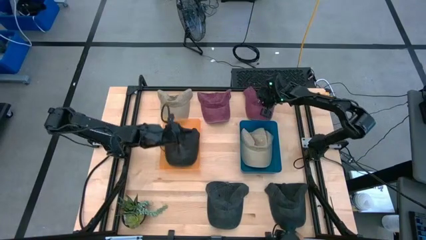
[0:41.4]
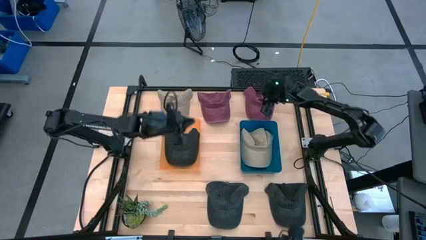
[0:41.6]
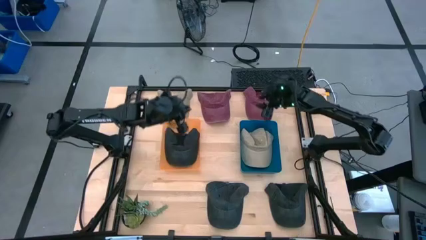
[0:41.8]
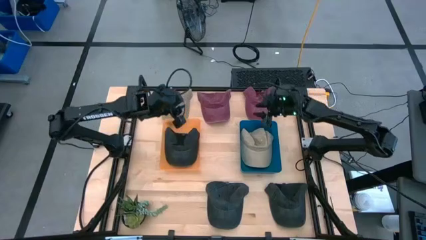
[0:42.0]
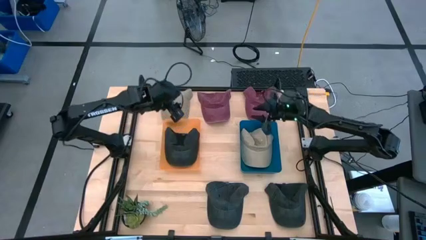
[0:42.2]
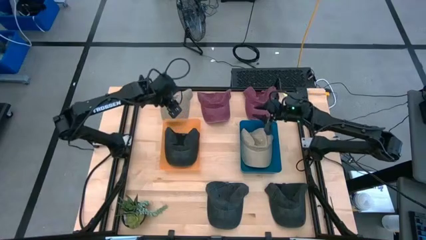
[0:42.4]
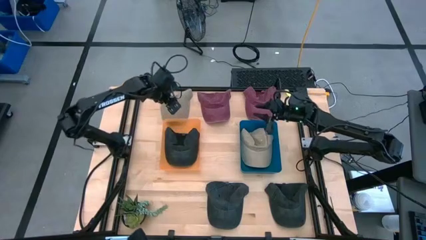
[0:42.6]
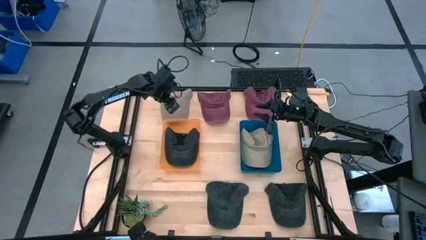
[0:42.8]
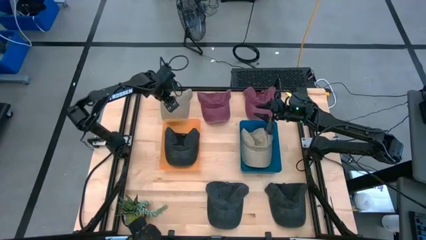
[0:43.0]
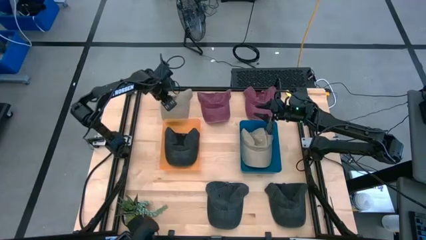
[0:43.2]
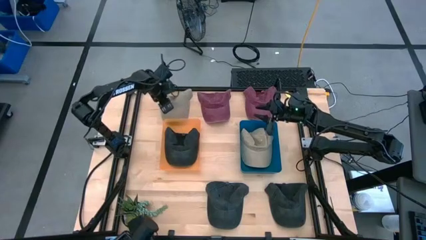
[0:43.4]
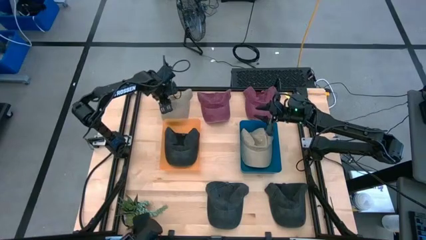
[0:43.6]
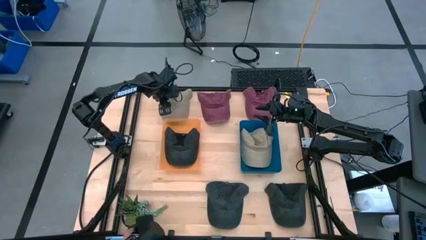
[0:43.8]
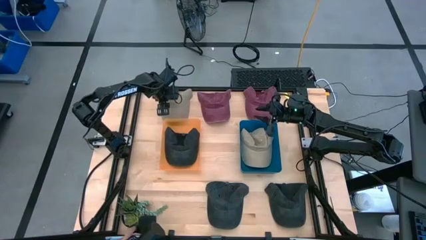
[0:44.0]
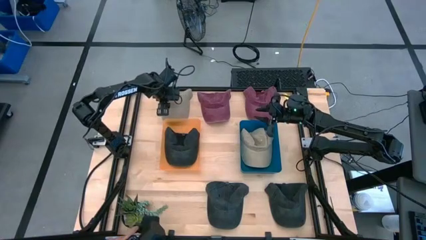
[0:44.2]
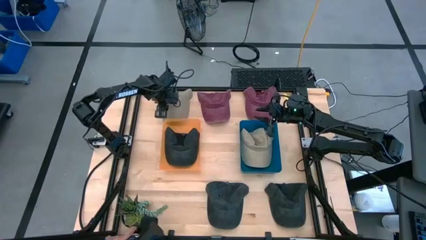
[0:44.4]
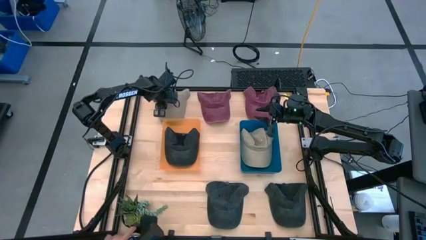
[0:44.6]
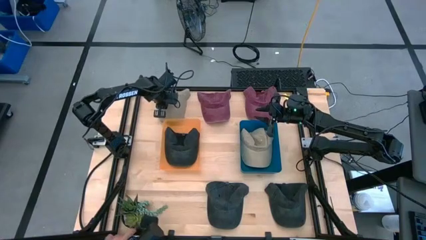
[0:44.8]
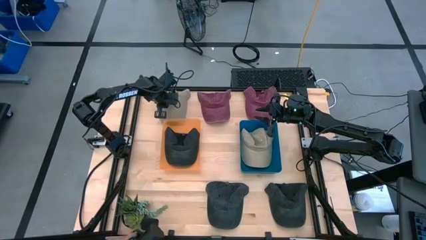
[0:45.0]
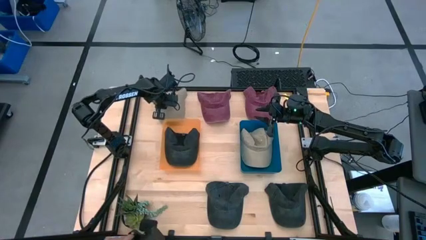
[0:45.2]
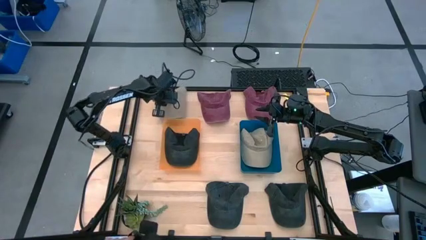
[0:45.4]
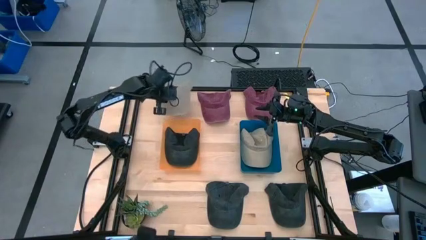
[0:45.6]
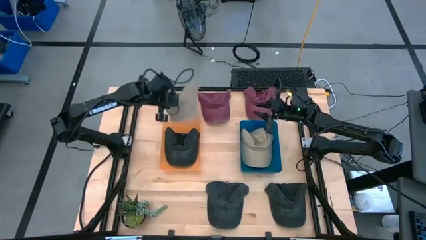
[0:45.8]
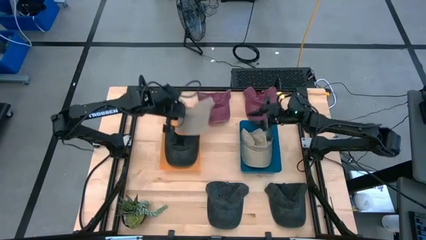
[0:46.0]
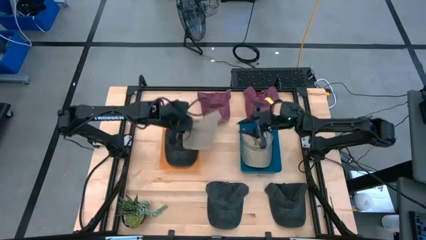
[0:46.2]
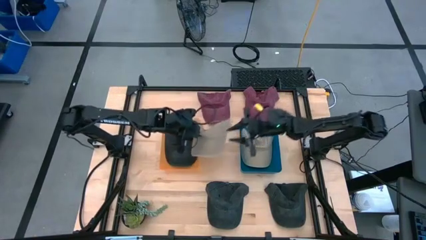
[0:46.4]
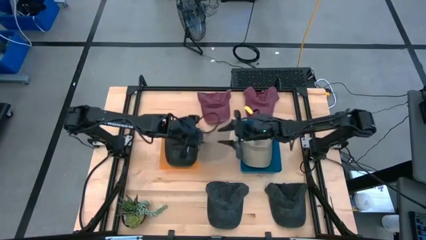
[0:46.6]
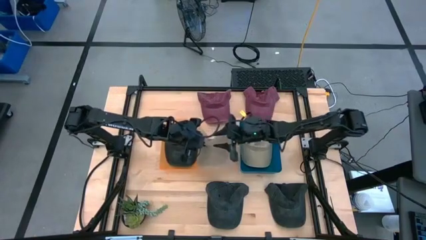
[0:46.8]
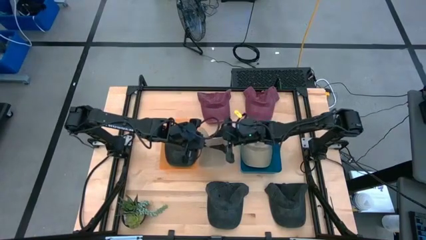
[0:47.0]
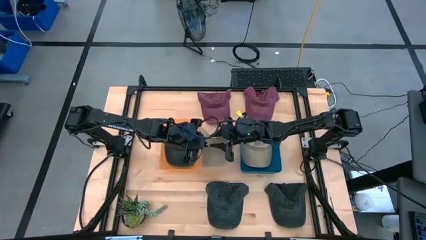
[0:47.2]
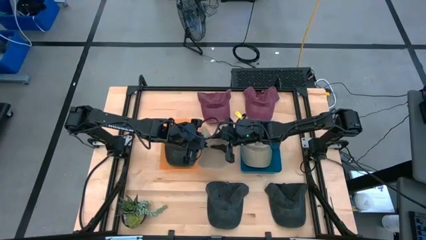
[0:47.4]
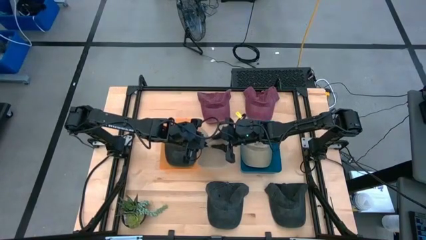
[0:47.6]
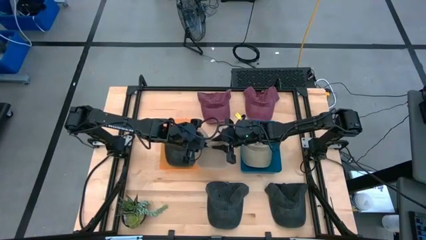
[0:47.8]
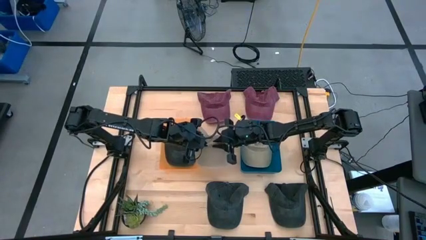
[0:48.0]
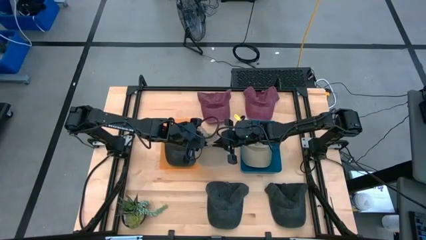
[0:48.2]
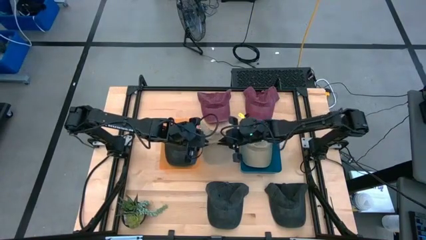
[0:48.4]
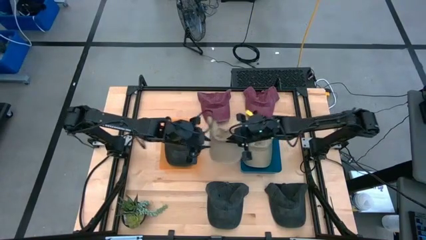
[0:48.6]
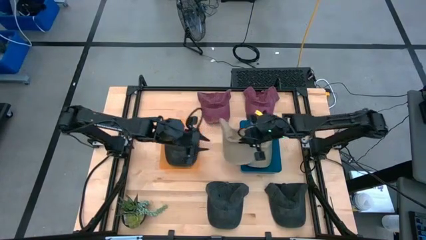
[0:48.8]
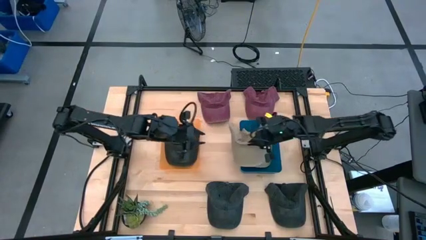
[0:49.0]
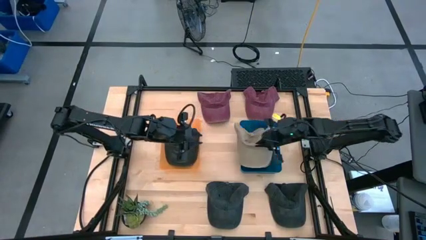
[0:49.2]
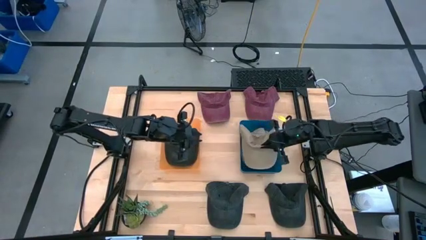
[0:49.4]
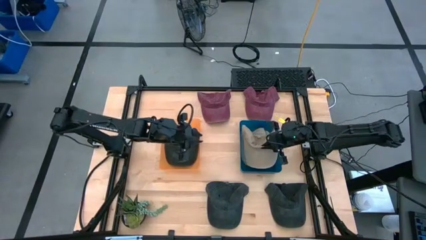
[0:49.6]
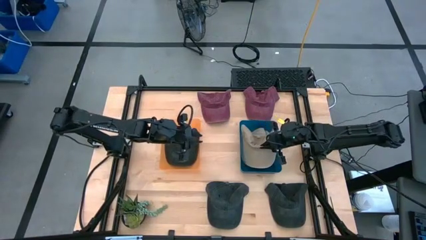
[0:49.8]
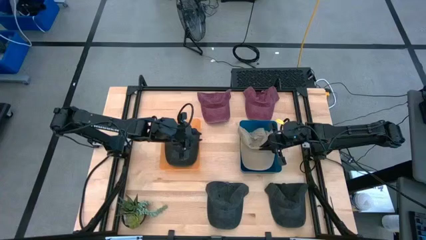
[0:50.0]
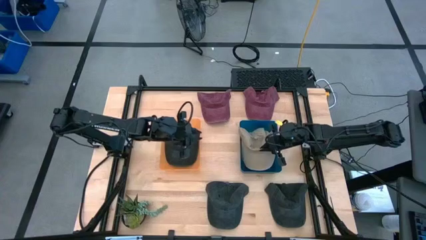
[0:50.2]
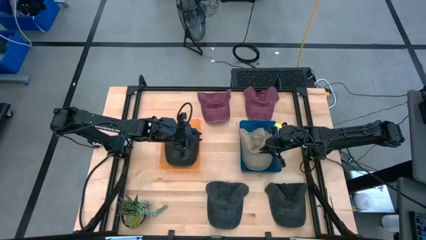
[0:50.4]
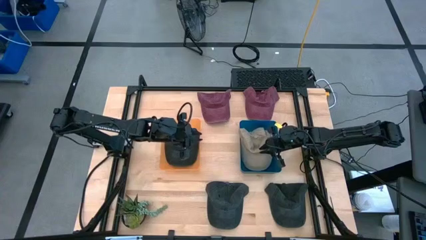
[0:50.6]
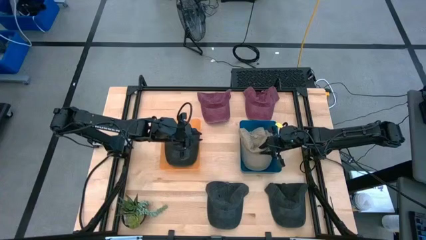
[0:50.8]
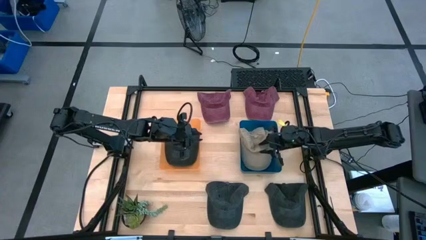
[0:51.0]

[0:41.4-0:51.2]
Task: Pick & Place hat
Put the brown cap into the blue bin

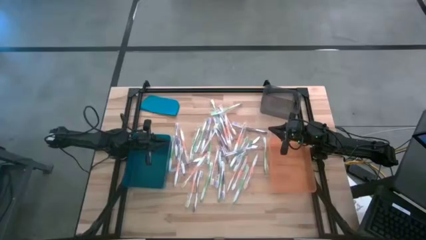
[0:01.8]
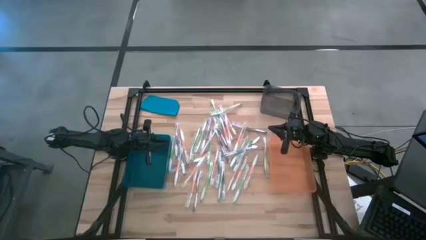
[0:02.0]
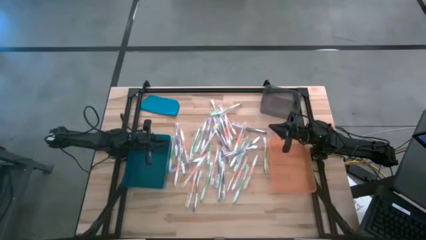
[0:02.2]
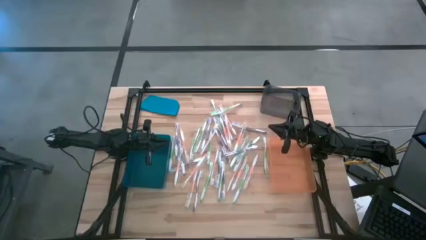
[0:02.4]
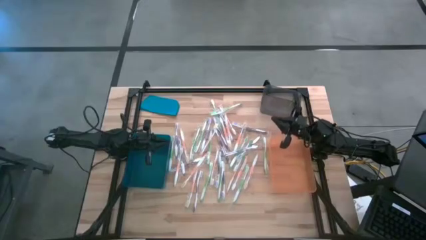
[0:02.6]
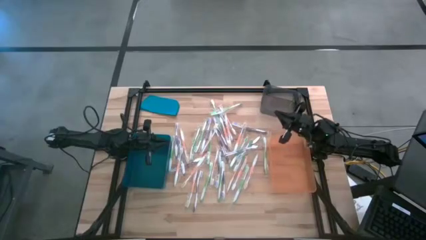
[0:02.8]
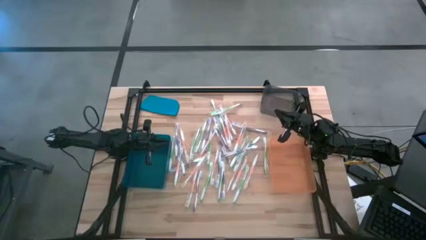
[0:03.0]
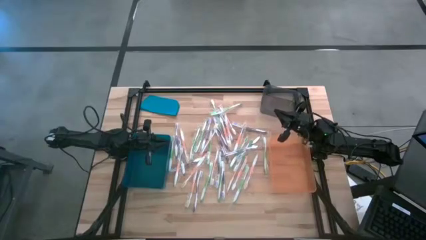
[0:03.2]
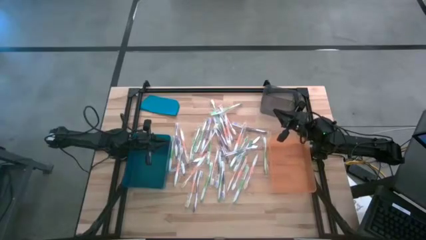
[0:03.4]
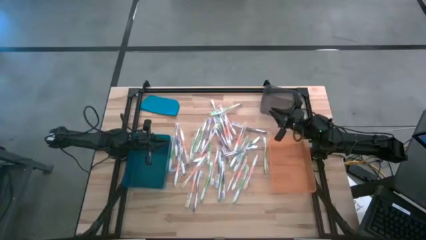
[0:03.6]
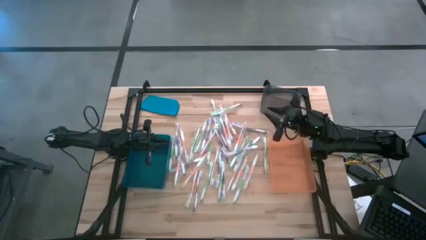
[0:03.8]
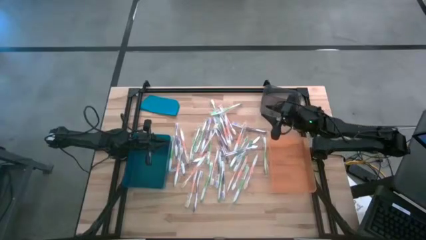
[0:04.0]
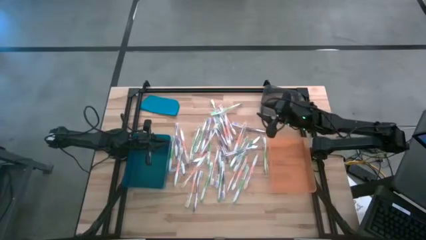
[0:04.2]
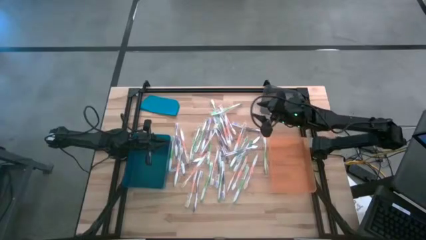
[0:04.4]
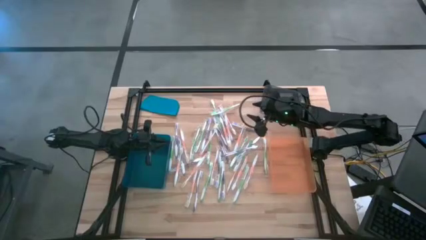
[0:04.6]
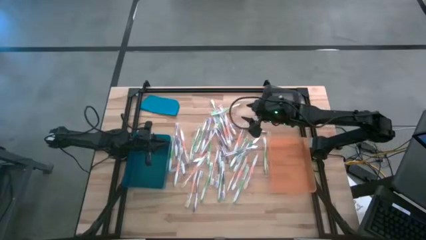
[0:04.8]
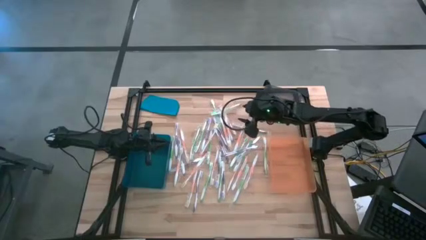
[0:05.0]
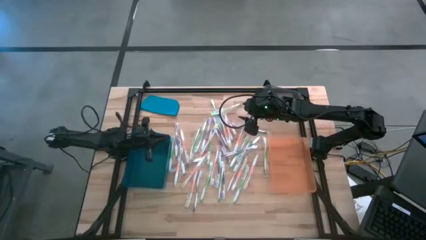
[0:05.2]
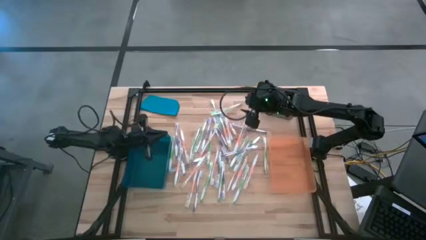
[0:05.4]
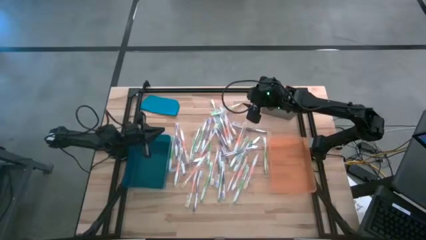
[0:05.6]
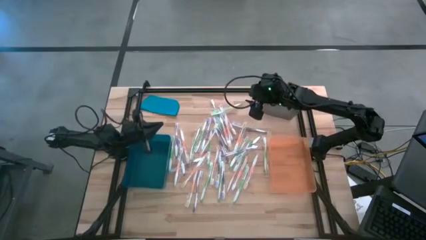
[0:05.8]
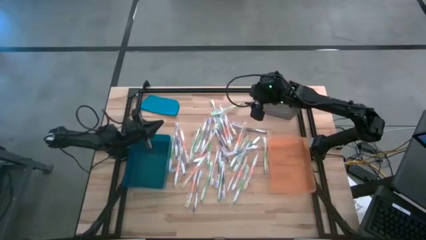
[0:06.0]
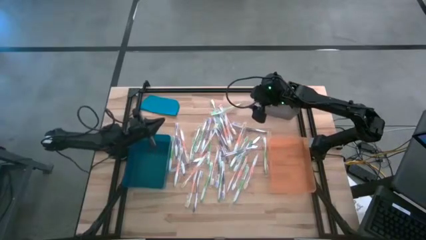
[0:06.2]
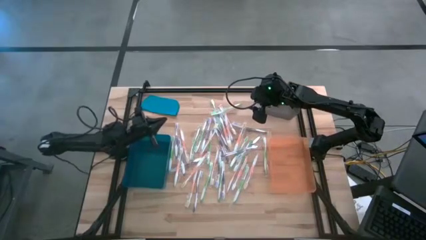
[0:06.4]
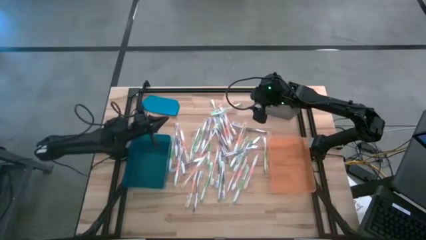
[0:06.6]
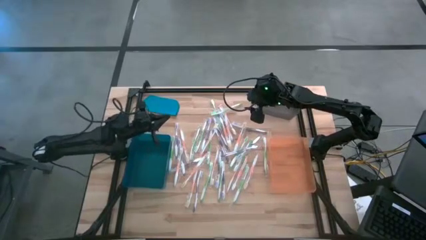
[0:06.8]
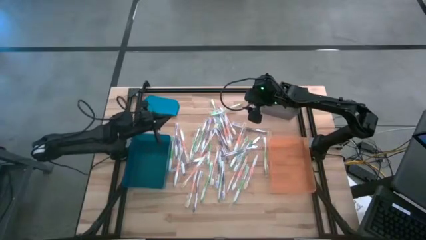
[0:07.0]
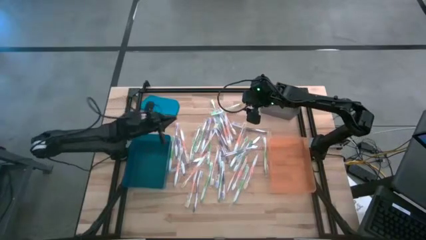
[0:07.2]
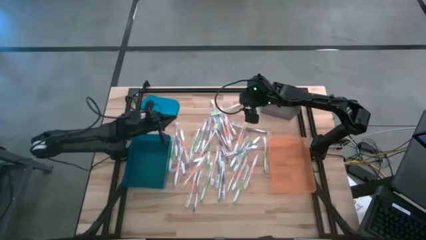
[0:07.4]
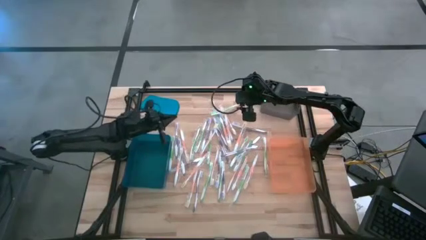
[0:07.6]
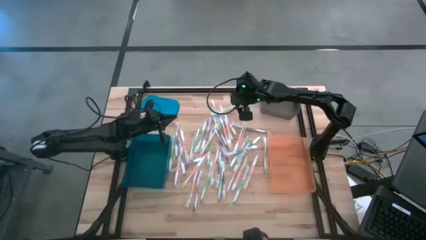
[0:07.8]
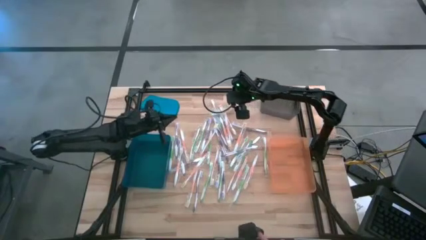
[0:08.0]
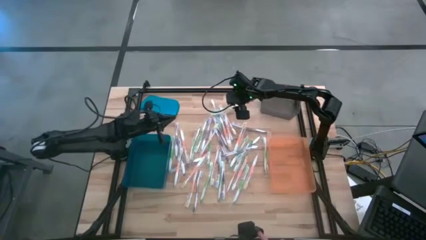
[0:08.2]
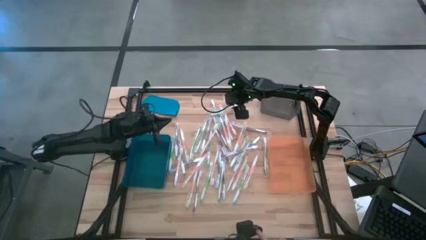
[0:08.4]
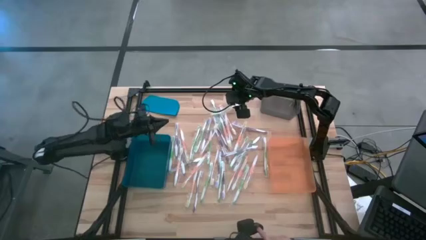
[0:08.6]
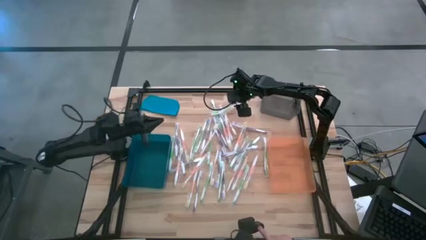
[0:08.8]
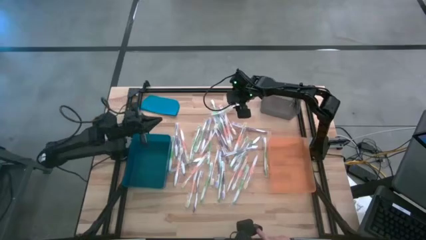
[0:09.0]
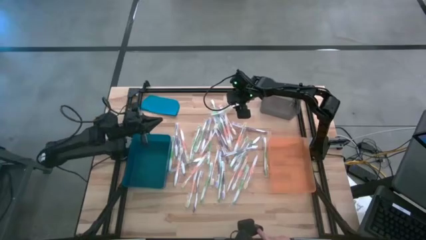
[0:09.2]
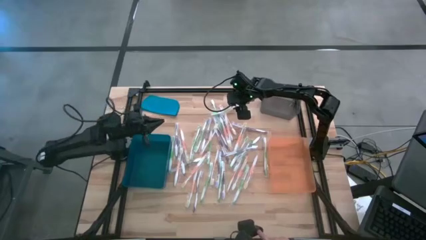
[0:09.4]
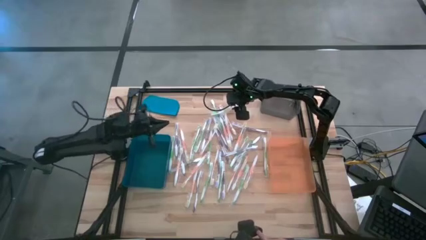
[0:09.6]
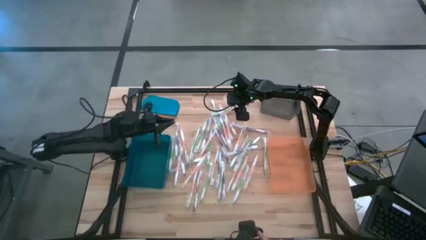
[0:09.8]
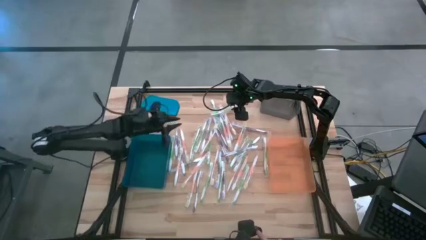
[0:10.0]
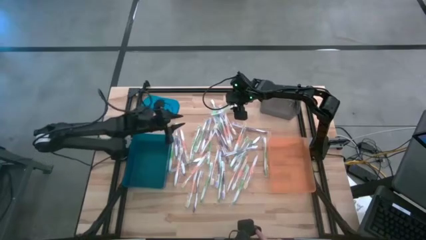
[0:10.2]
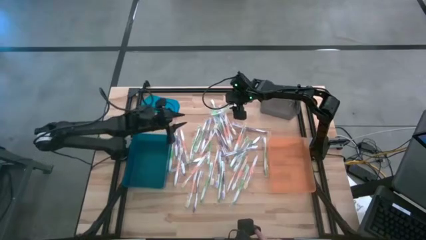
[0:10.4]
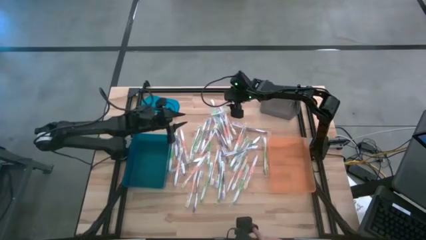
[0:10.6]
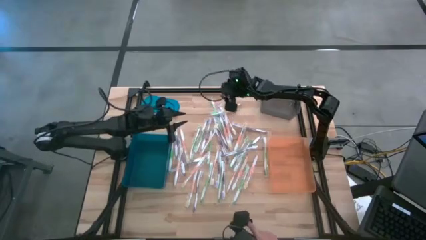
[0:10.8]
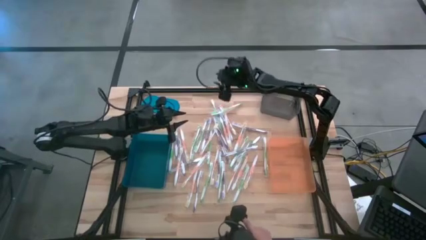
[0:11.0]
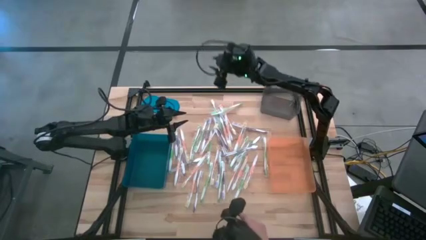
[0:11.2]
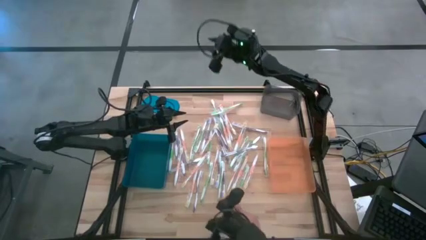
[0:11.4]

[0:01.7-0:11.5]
Task: Pick & Place Toothbrushes
Put the green toothbrush into the black bin
